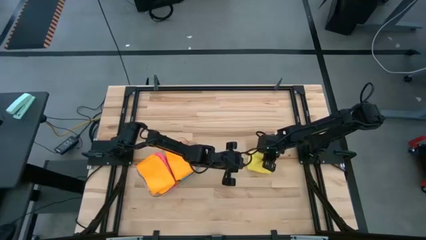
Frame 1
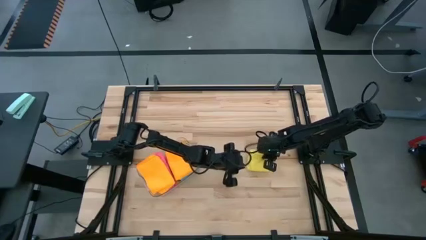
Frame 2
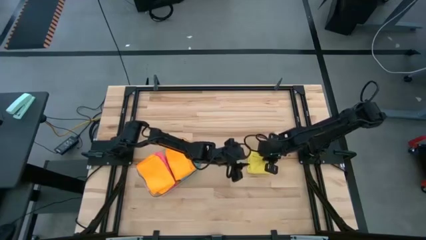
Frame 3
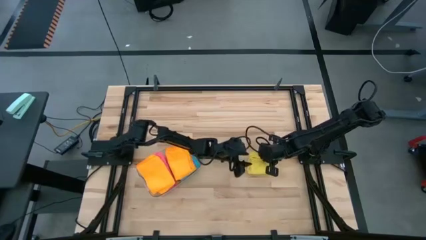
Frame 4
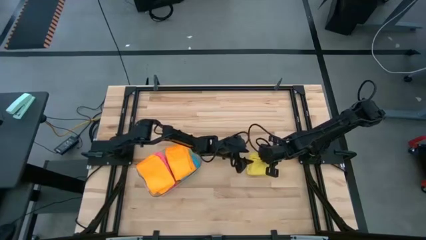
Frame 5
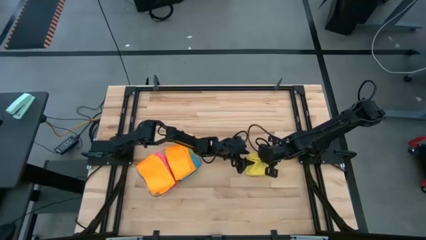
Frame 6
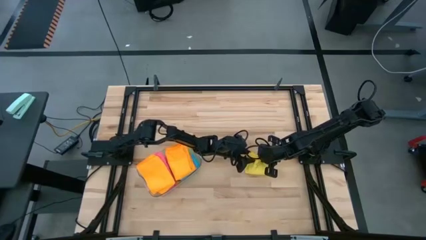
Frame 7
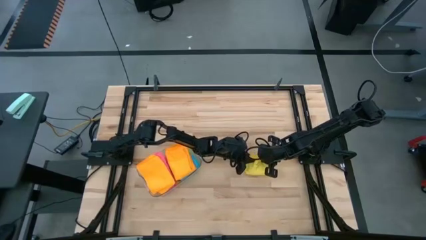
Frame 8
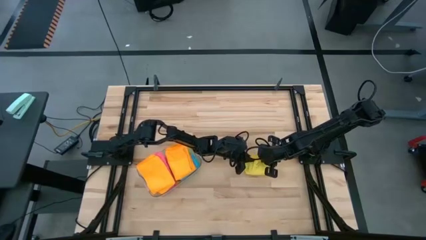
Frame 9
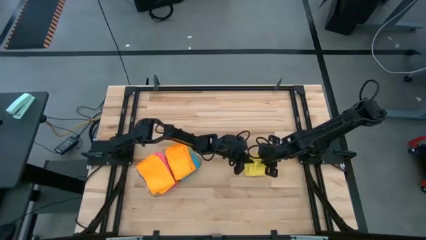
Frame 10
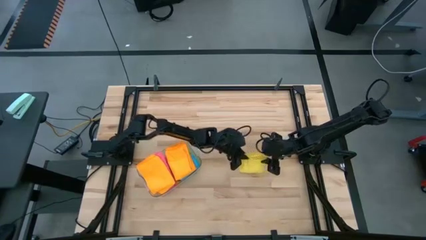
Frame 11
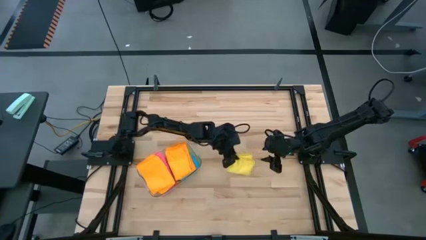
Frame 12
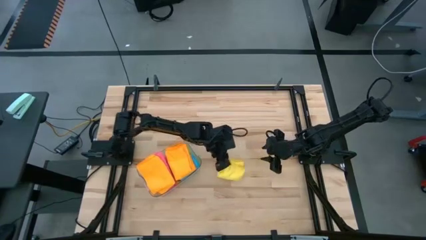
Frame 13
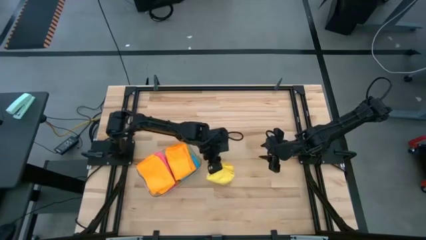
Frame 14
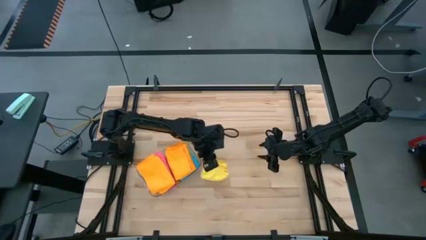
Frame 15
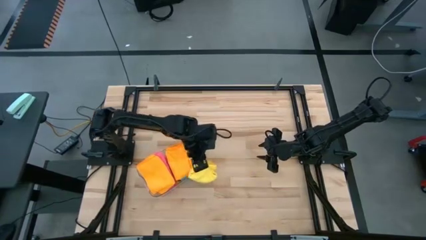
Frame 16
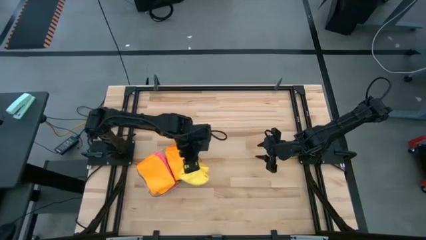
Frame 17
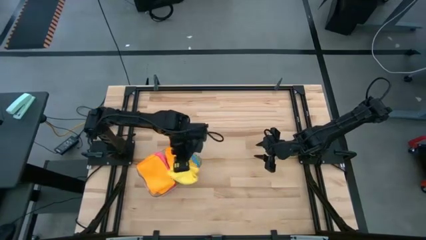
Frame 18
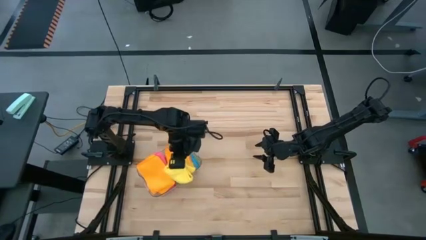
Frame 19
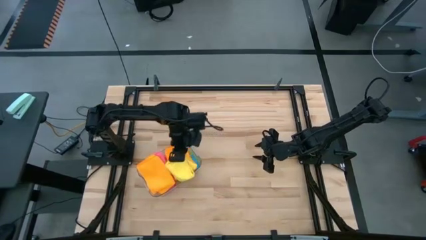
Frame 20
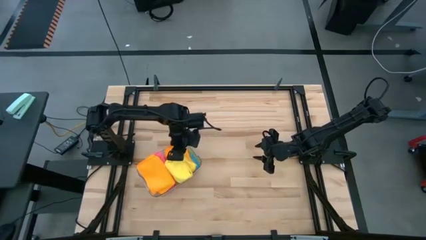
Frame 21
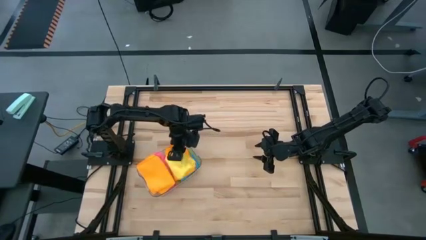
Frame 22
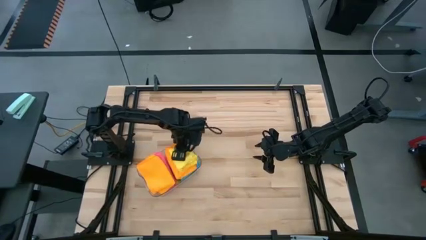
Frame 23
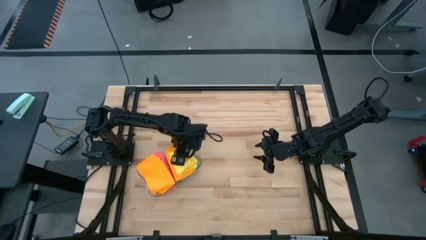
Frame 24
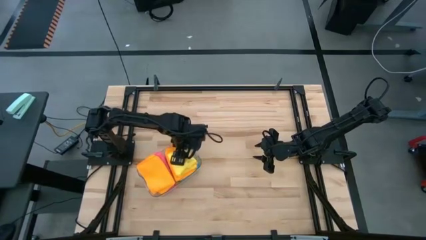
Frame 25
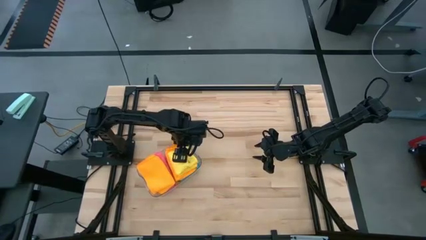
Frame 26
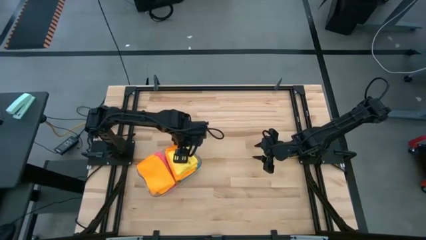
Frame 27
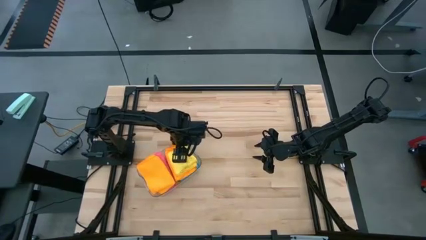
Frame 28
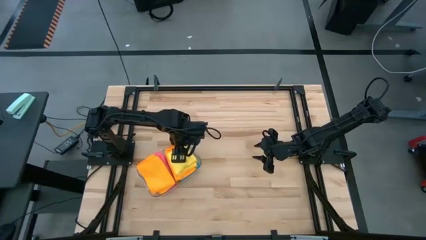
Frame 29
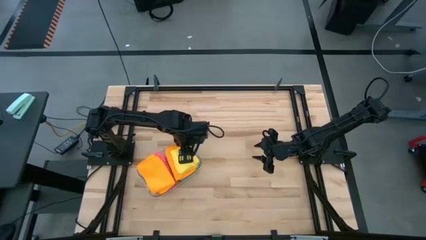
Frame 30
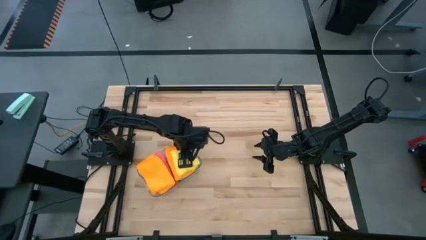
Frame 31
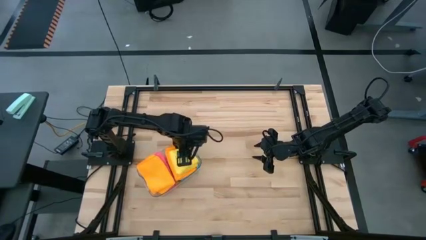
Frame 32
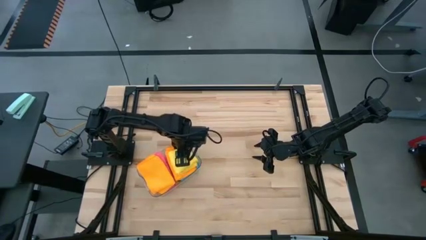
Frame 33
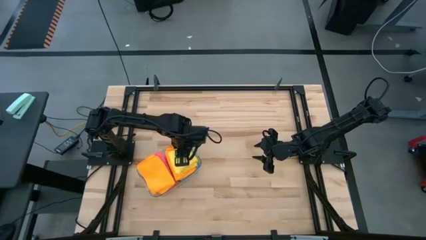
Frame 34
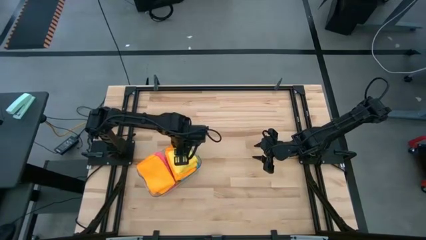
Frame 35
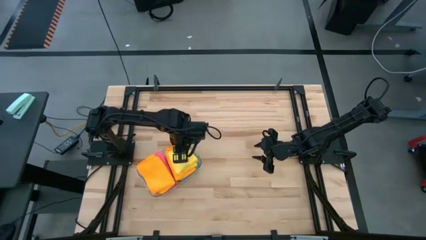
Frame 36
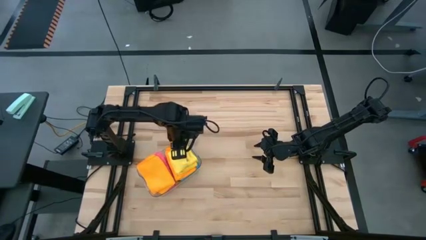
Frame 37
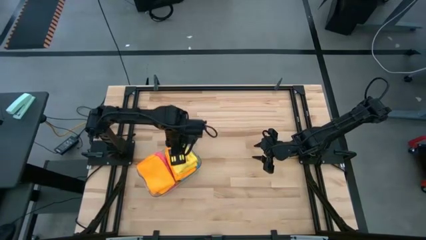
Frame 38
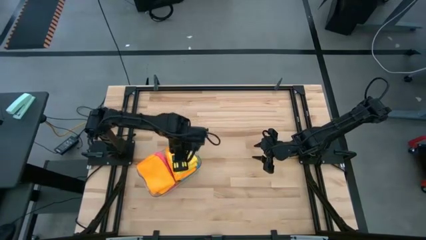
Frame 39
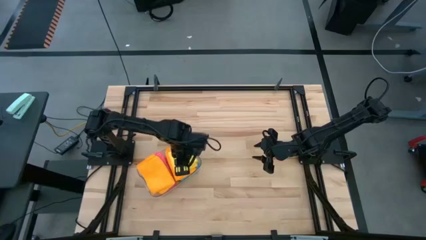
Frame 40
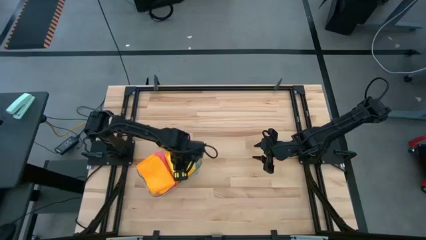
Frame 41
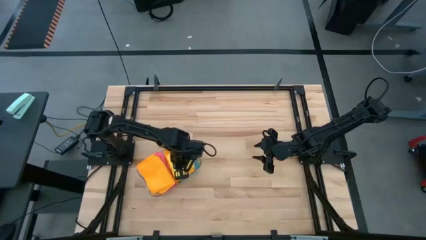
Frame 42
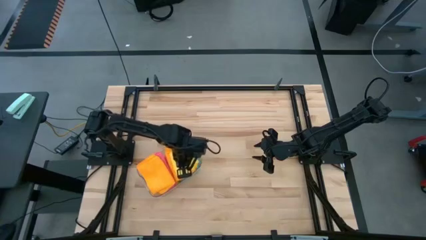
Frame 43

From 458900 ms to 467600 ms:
Task: Fold microfiber towels
Put the folded yellow microfiber cloth into the transparent bin

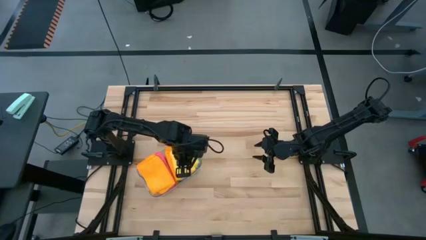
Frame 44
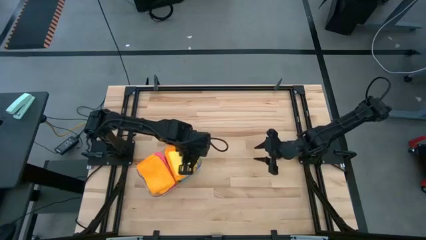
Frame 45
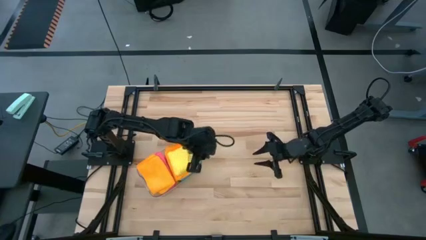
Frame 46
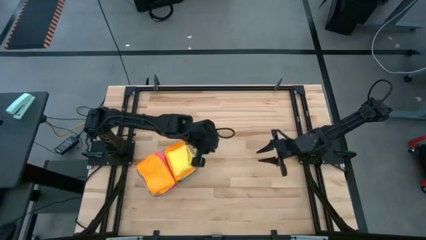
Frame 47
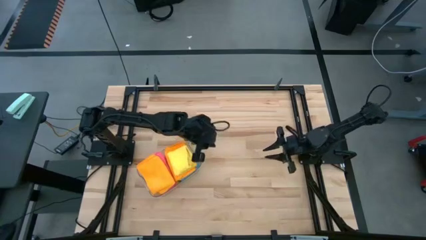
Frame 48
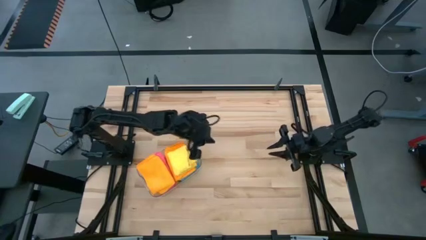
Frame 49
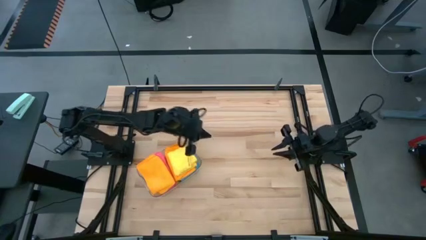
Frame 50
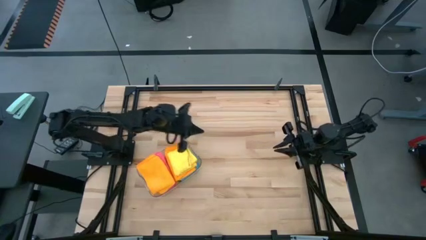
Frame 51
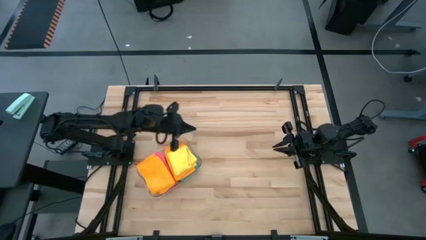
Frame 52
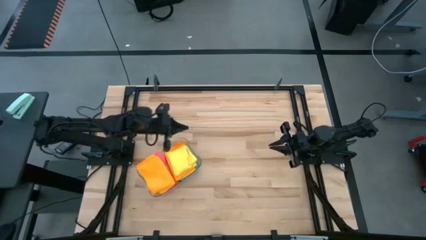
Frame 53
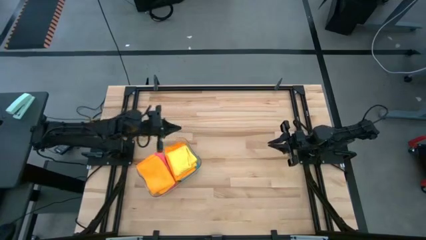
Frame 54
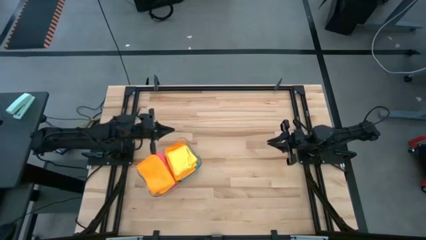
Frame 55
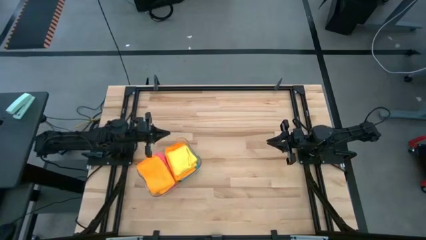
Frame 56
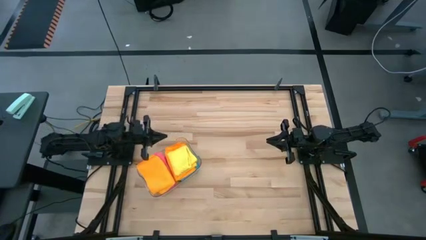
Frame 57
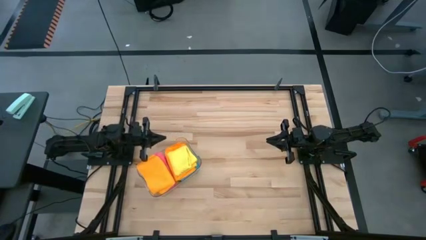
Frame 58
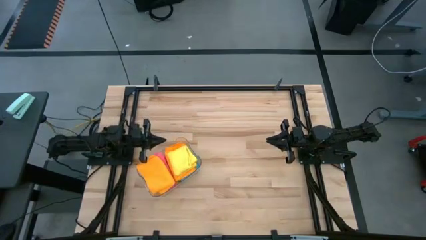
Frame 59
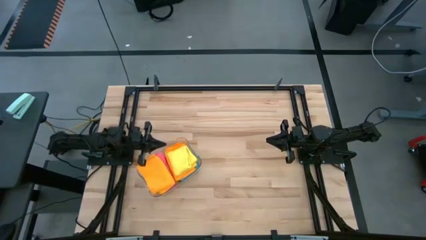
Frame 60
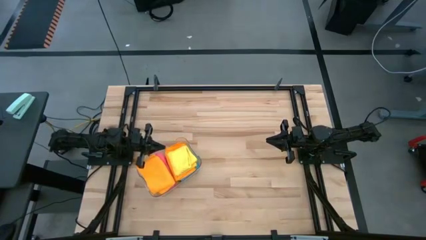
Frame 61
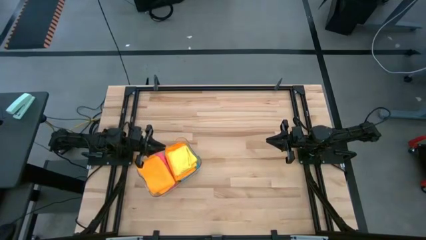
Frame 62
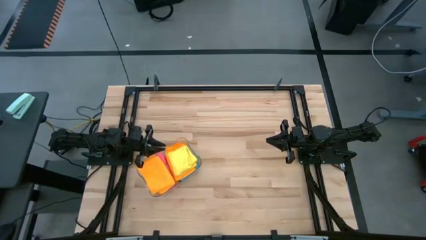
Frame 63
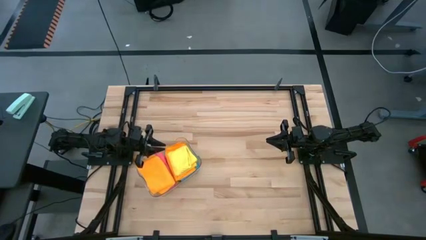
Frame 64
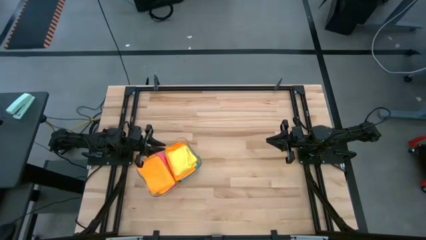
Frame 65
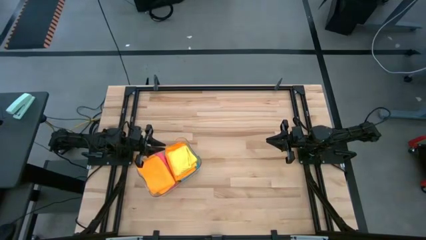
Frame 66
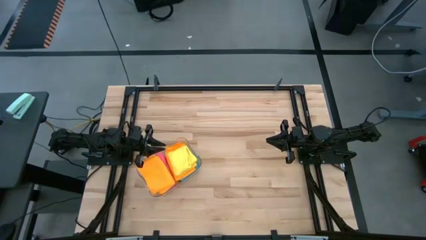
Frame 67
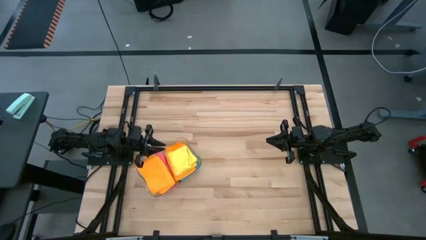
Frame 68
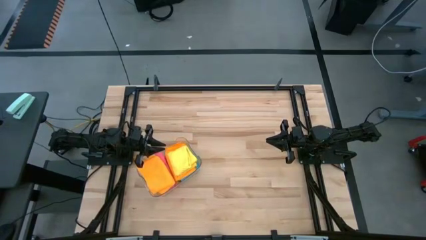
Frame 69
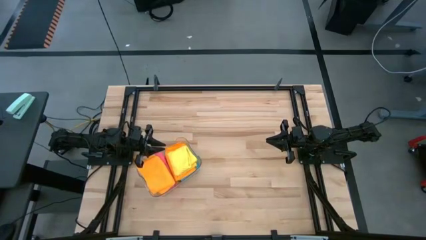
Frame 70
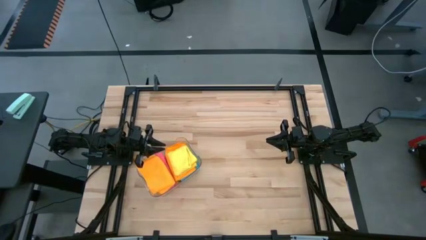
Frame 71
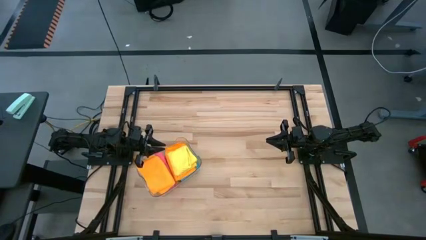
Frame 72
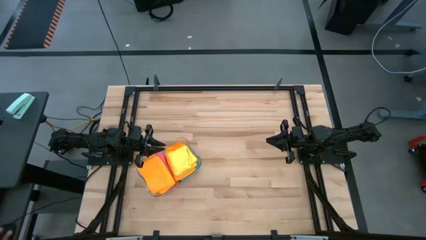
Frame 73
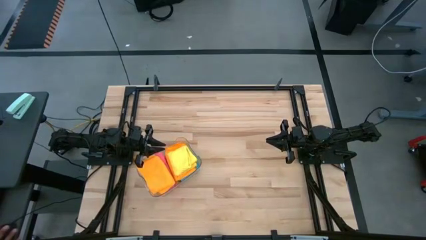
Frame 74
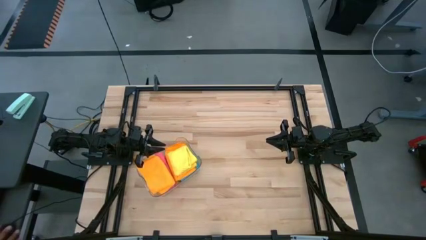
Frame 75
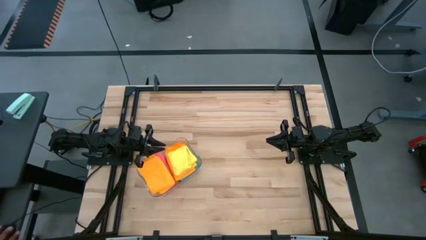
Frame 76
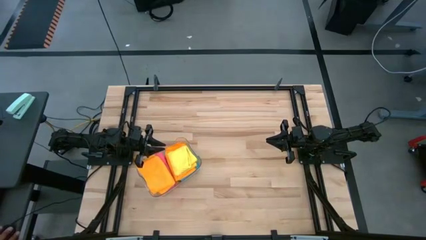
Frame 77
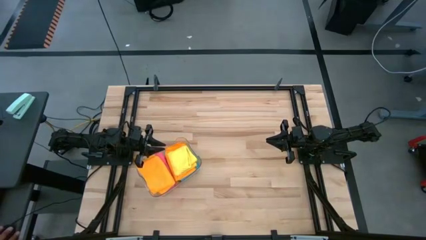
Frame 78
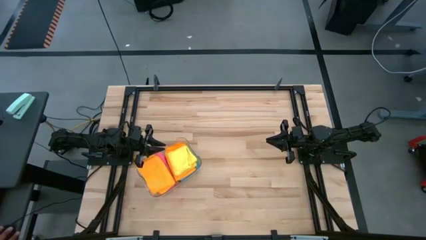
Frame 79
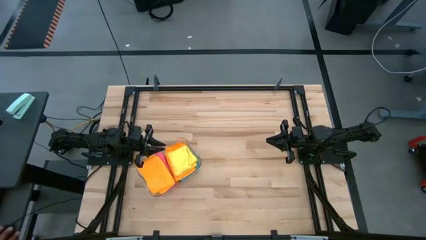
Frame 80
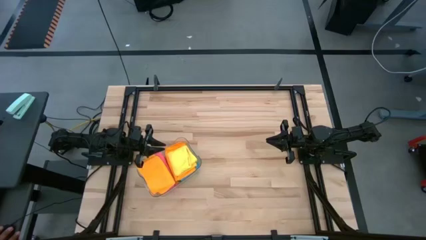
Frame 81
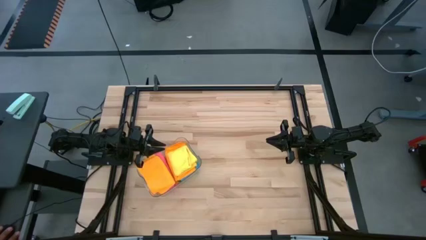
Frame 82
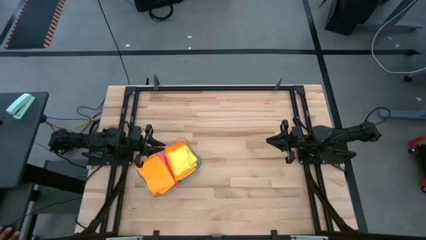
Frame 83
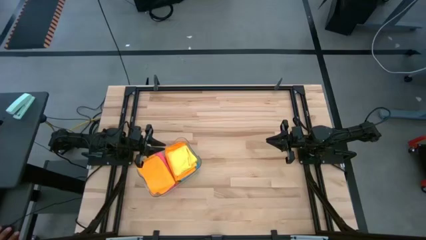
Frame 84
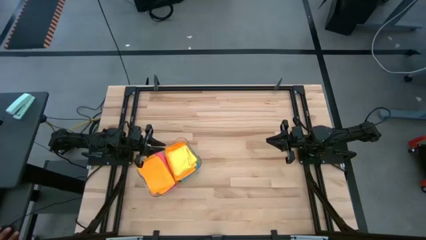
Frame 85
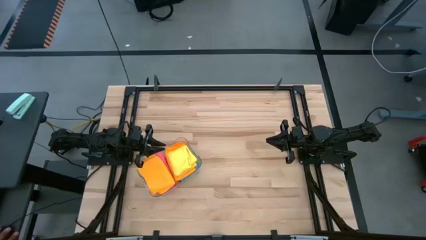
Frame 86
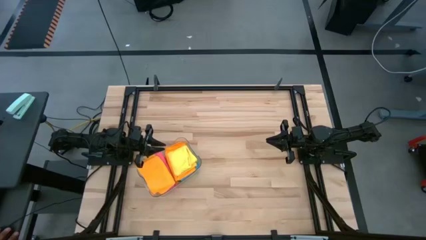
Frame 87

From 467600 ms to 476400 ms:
Return to Home Position
